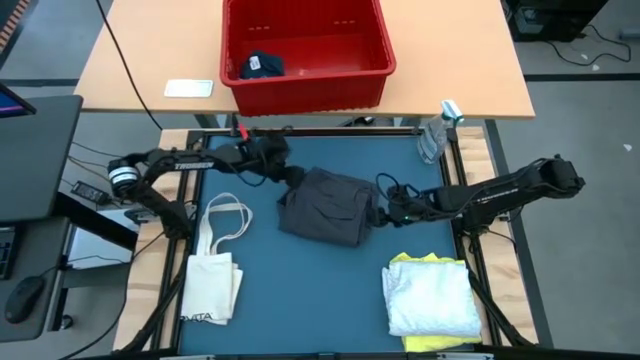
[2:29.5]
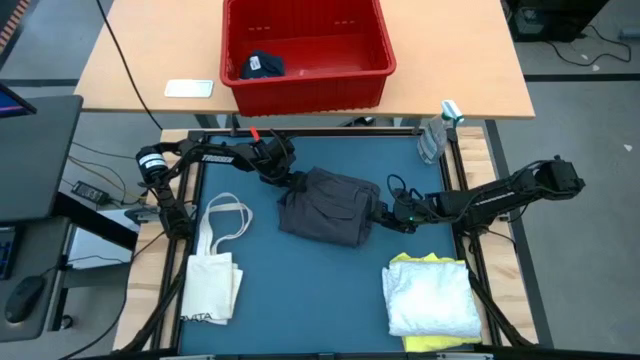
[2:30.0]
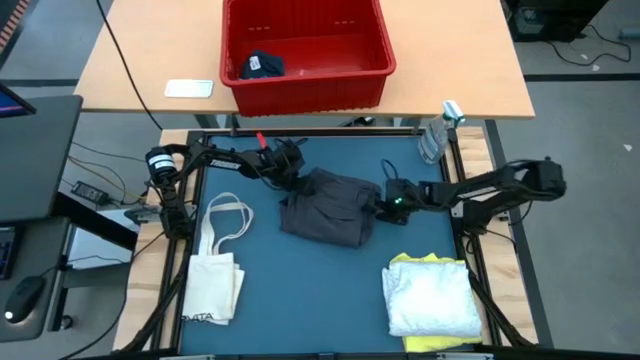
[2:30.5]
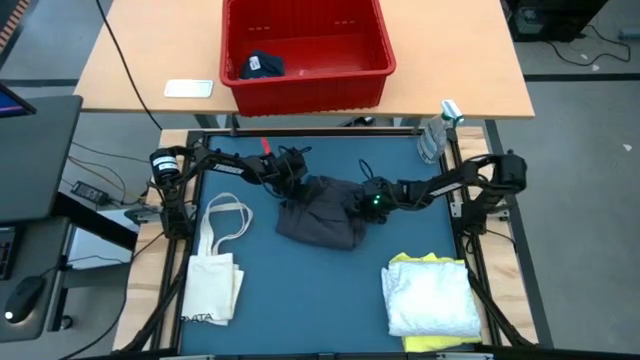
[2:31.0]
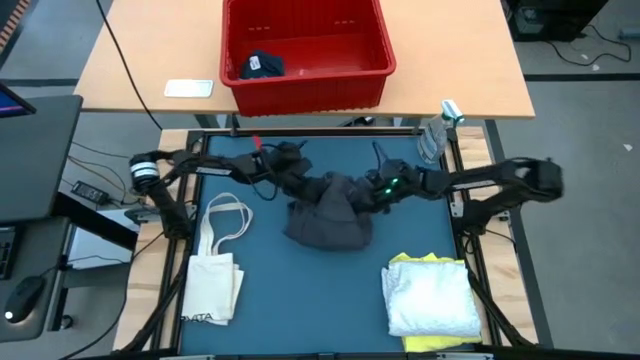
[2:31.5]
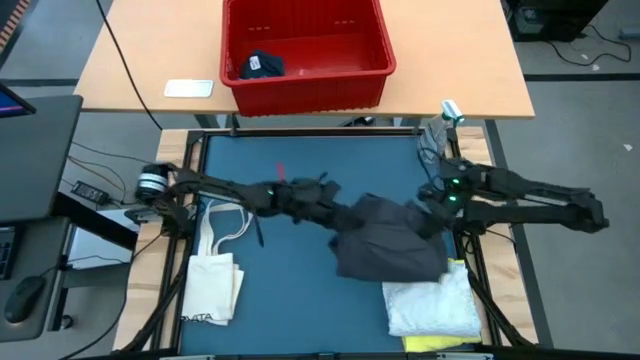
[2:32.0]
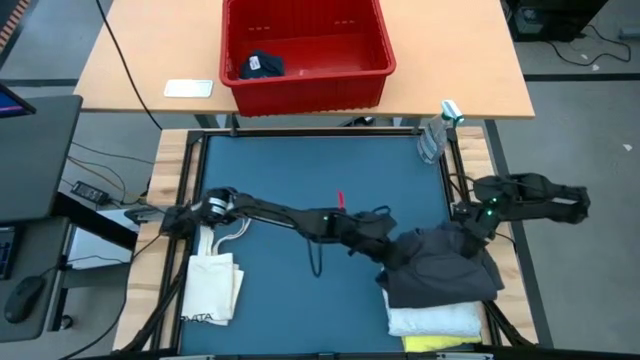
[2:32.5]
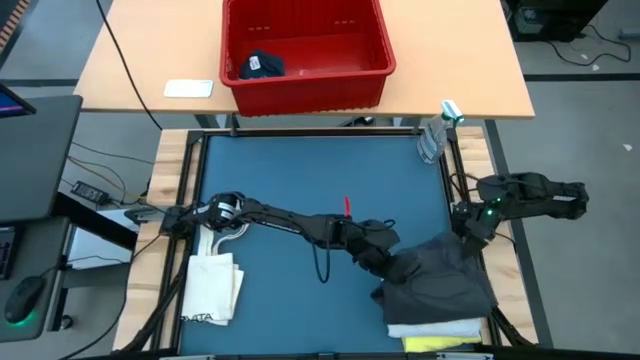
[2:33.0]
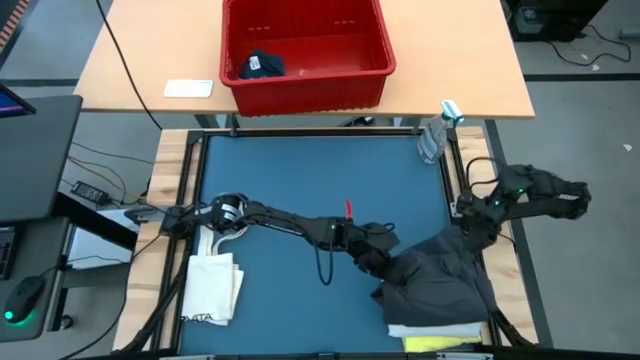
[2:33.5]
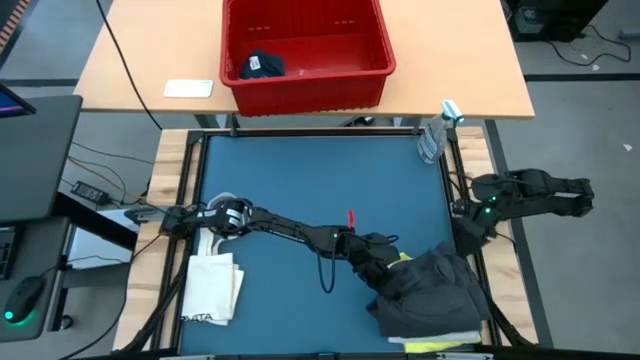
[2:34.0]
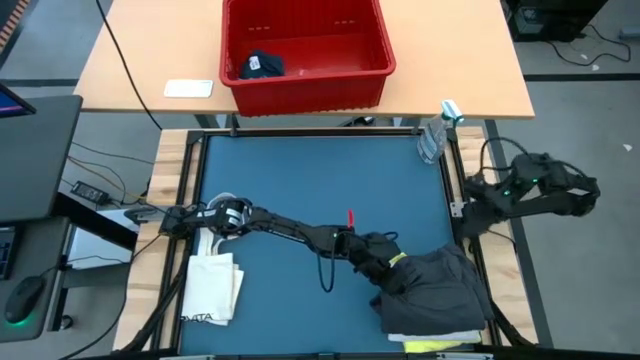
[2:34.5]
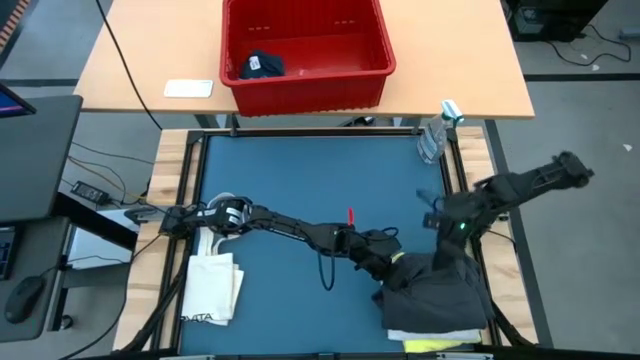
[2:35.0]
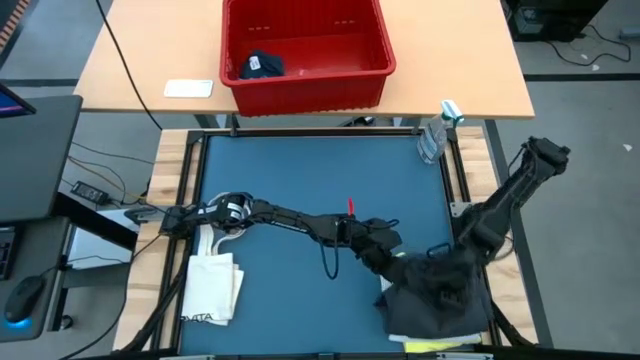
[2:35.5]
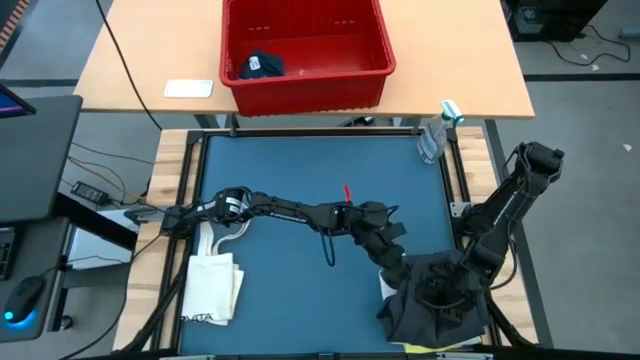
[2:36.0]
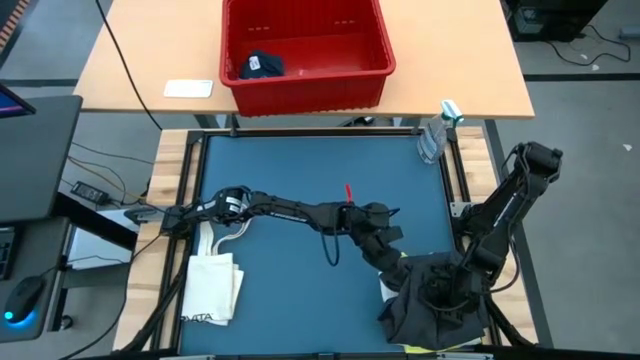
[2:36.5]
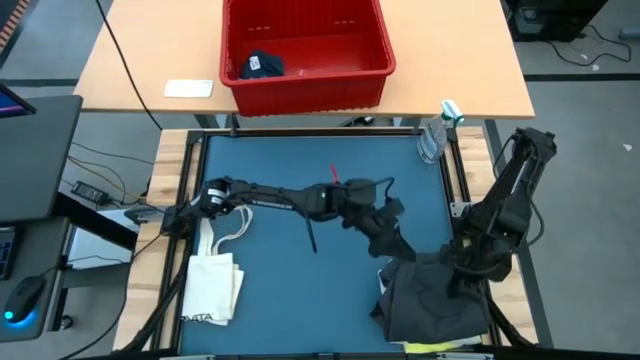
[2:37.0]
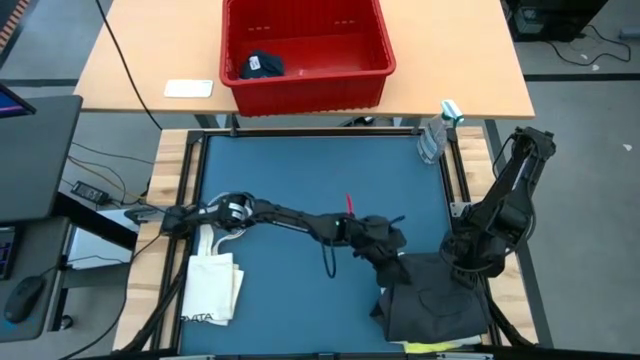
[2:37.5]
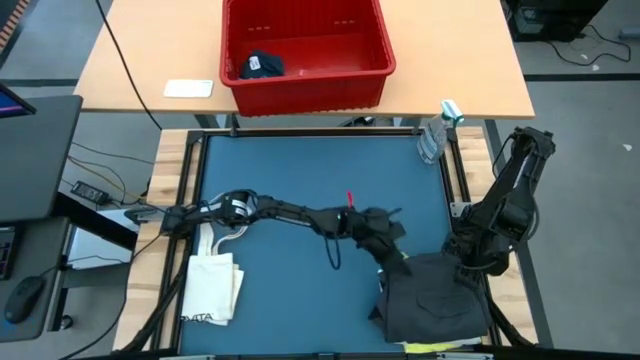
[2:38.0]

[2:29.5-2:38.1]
Task: Fold laundry
Stack the gray boxer on top of the white cloth

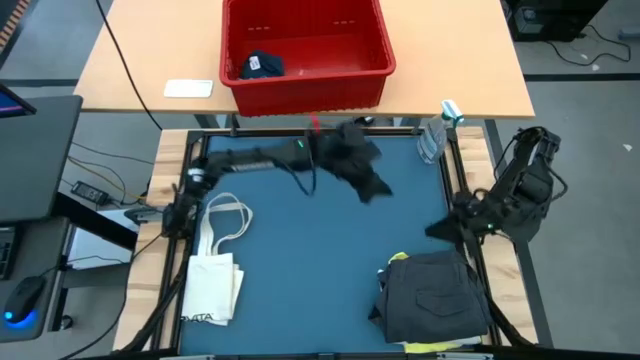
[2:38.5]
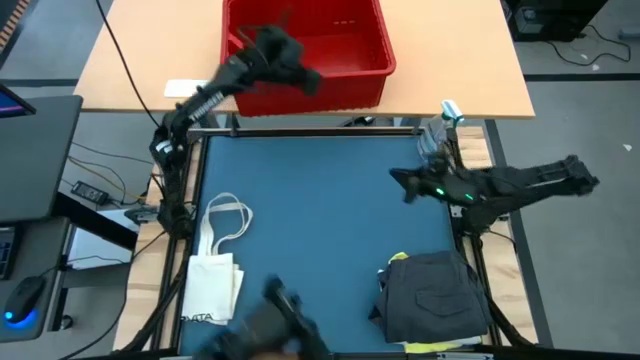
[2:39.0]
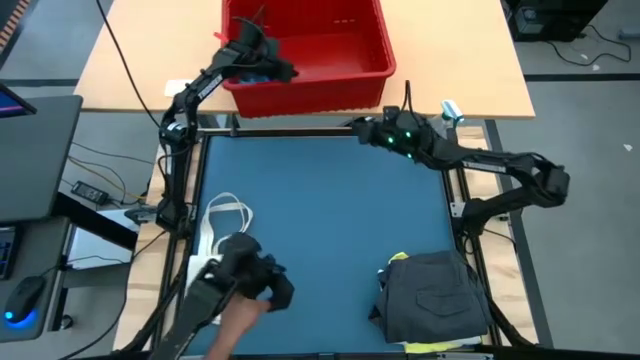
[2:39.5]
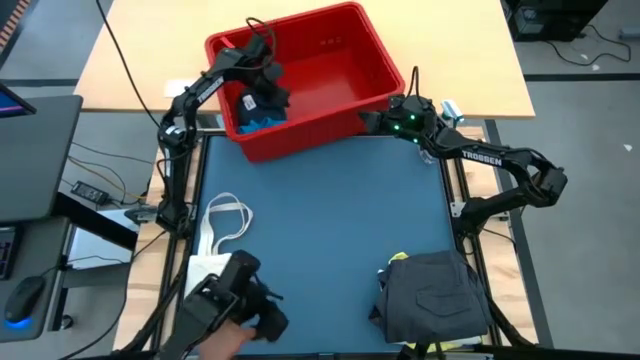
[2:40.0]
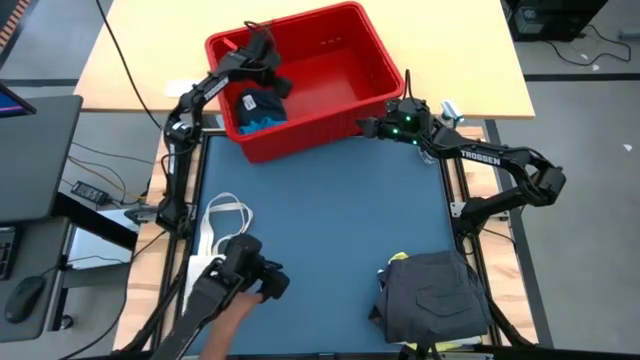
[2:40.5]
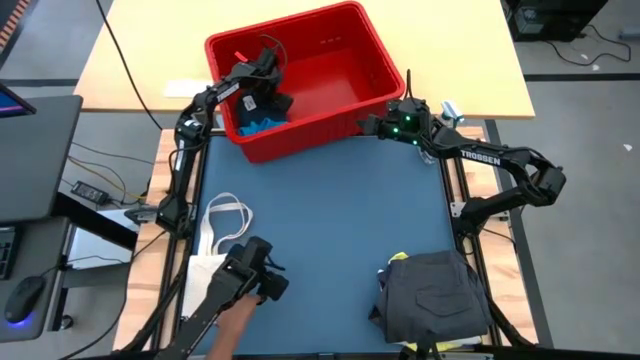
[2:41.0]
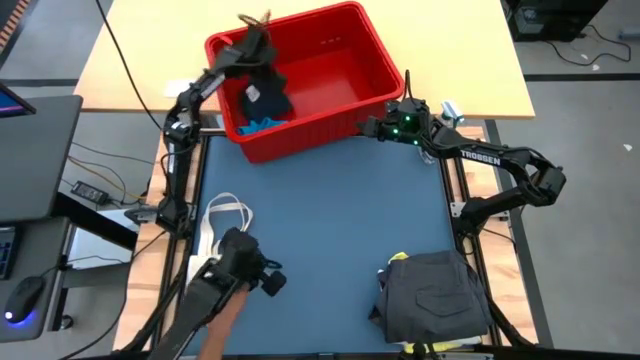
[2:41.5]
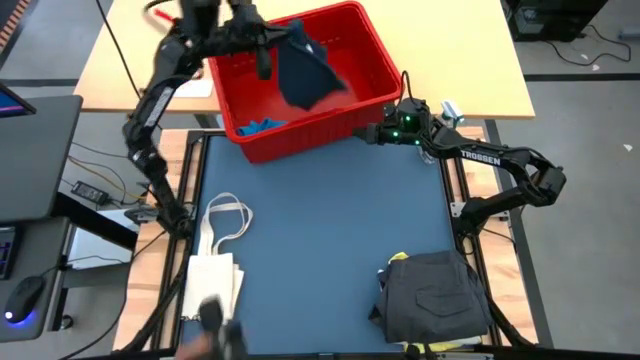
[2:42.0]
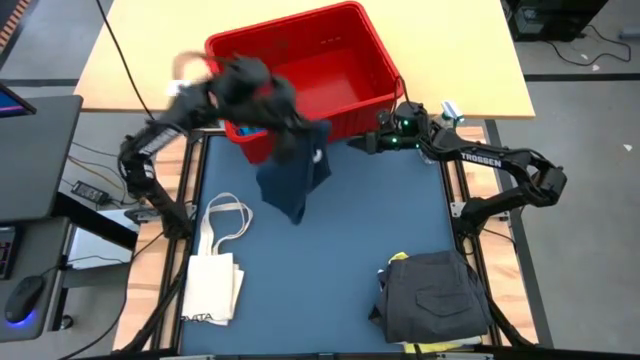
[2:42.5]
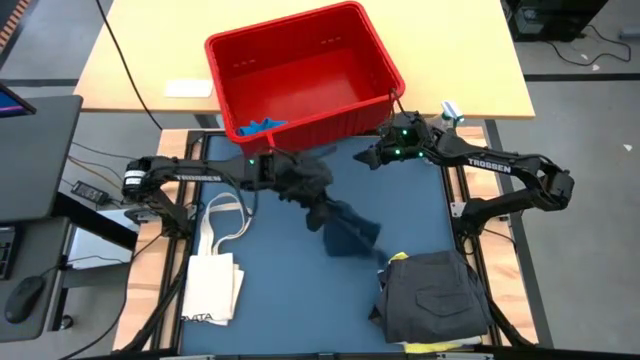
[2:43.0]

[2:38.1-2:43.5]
Remove the blue boxer from the red bin

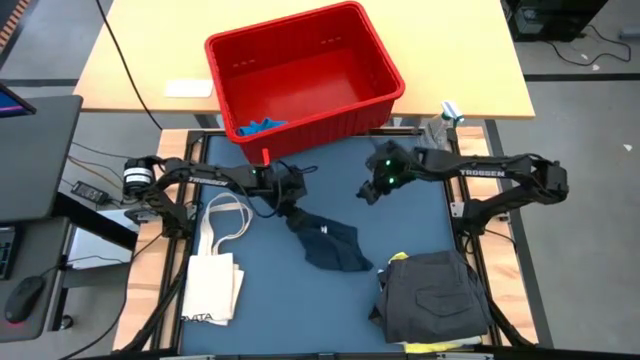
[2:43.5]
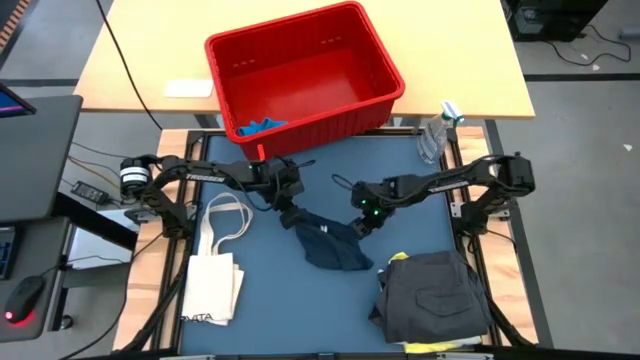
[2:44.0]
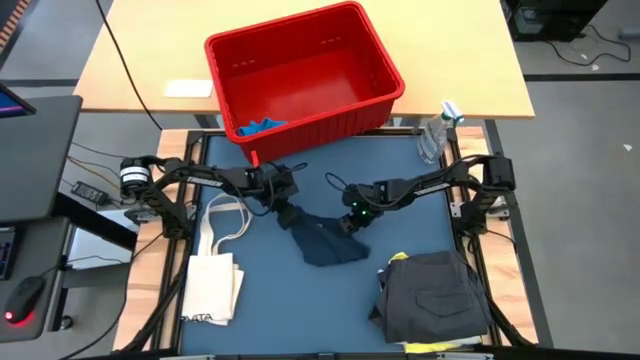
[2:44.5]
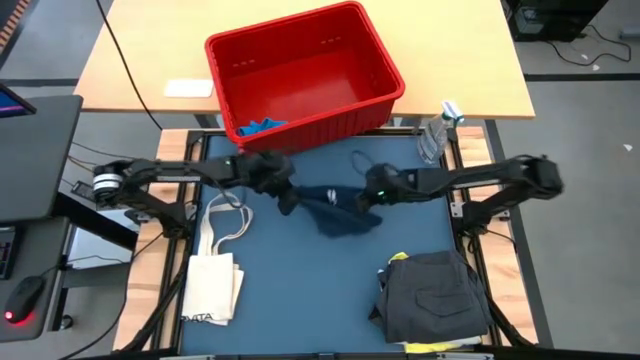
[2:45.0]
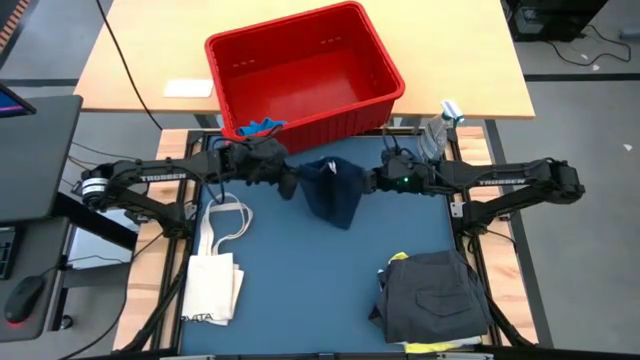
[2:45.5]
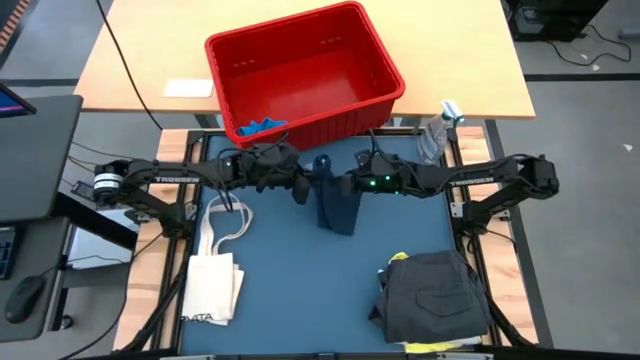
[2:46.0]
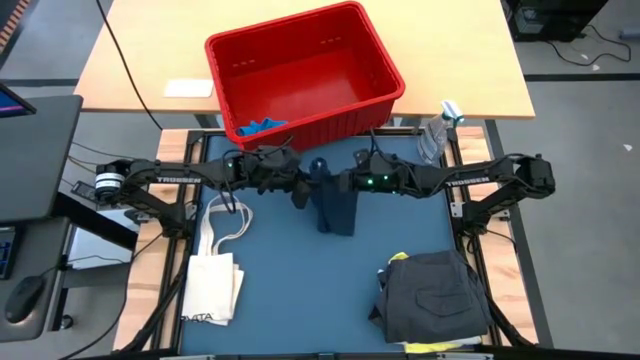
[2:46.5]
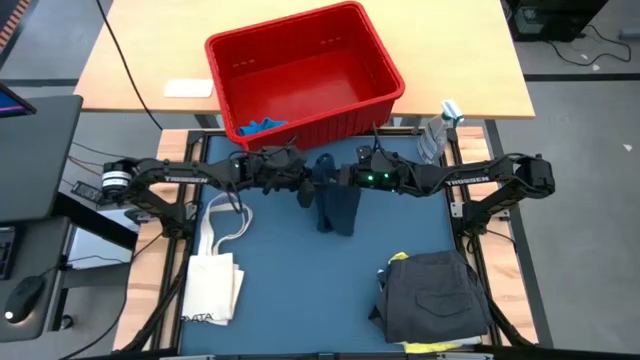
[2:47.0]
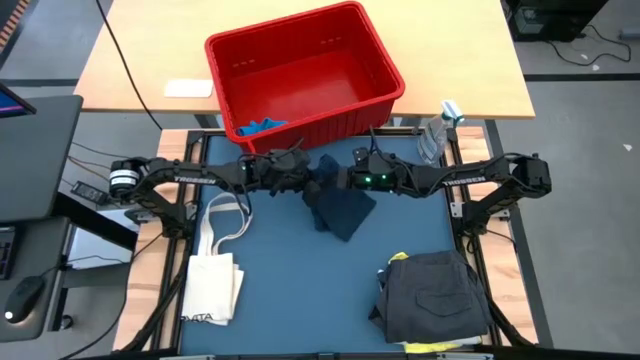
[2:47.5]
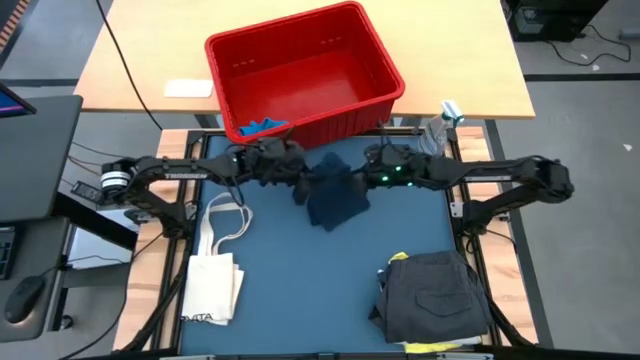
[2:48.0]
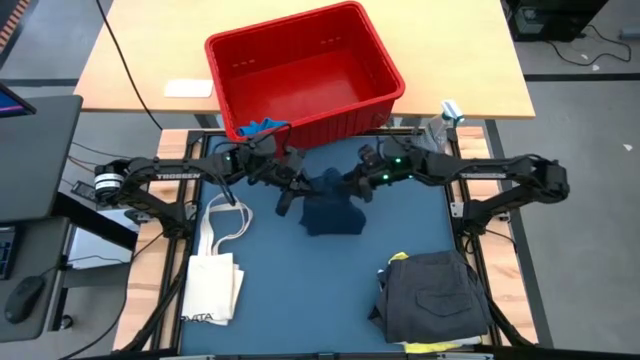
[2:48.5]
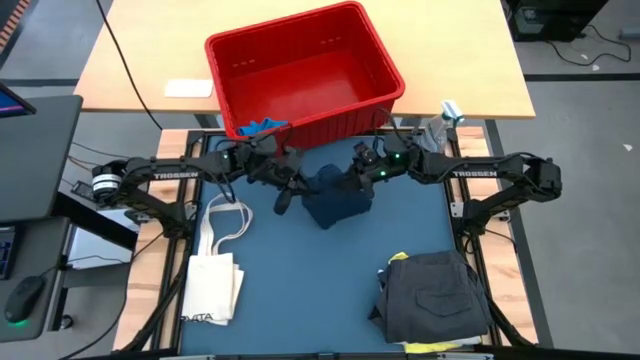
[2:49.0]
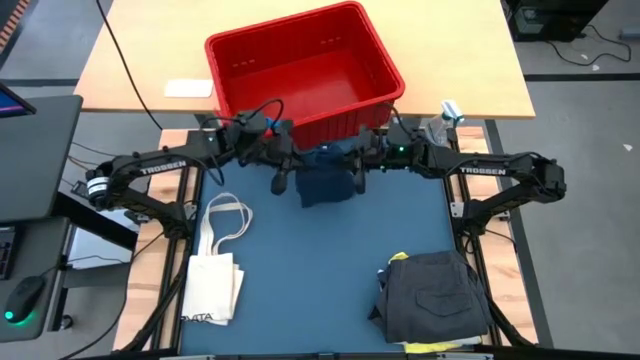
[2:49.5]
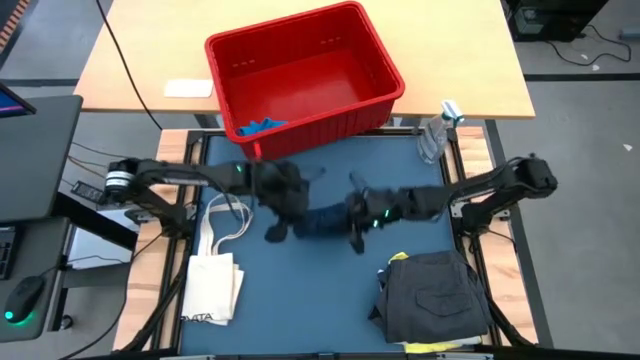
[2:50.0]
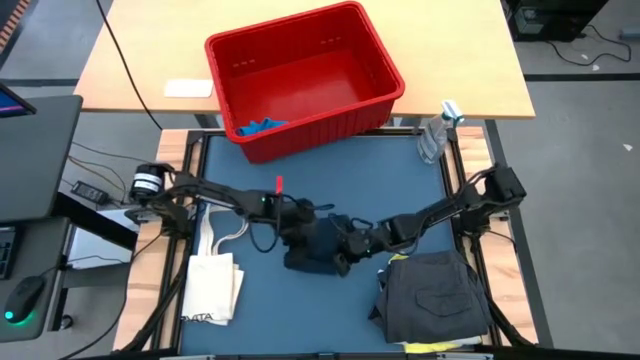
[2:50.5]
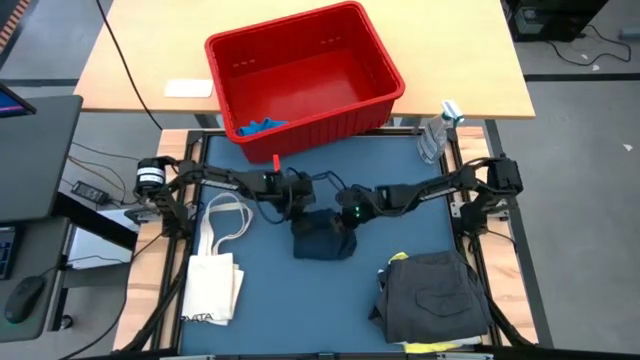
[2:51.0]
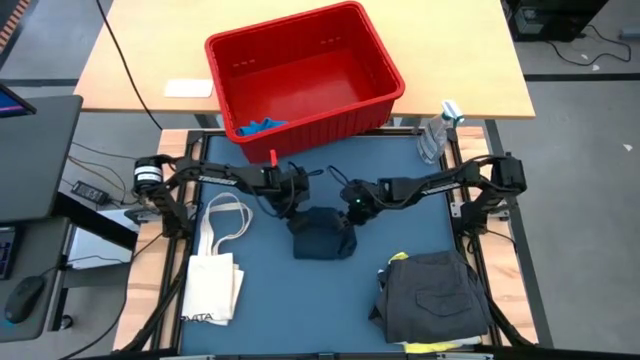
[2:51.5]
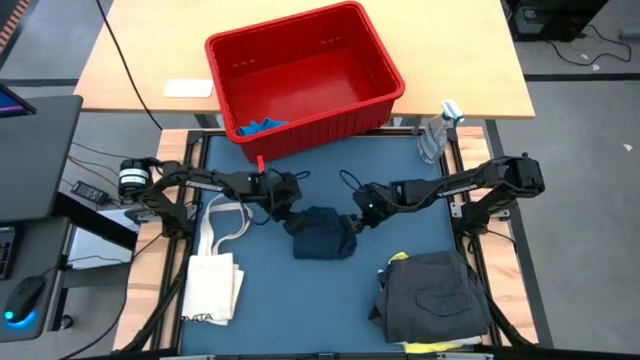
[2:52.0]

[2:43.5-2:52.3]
Fold the blue boxer
